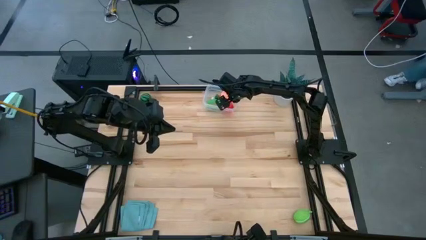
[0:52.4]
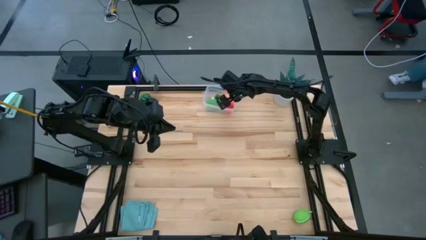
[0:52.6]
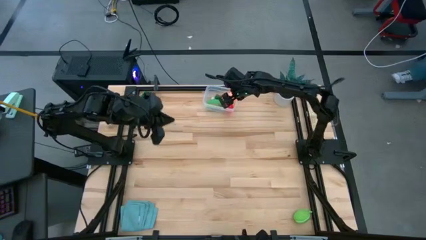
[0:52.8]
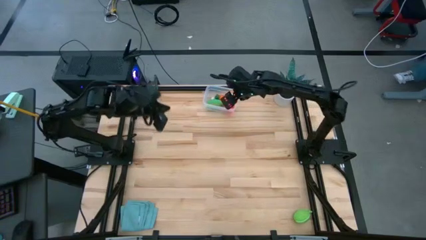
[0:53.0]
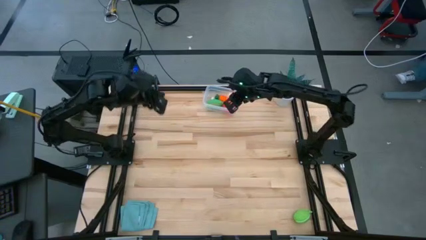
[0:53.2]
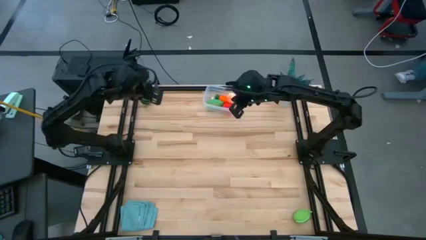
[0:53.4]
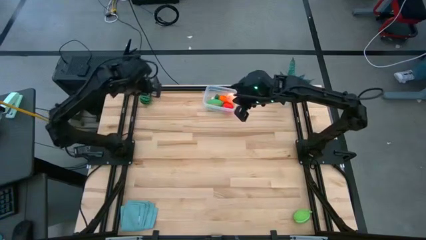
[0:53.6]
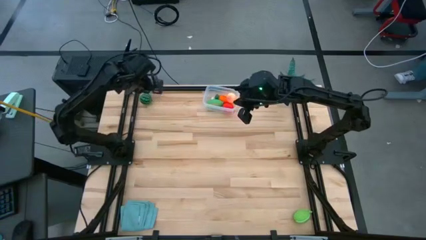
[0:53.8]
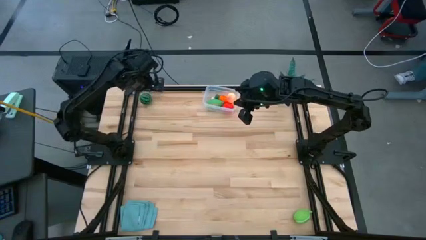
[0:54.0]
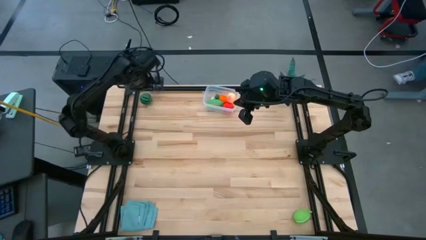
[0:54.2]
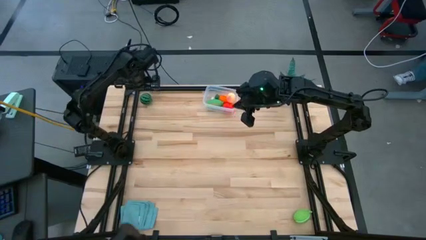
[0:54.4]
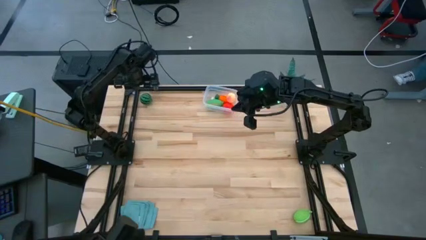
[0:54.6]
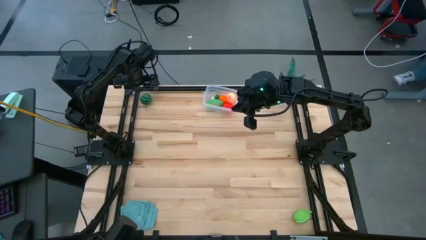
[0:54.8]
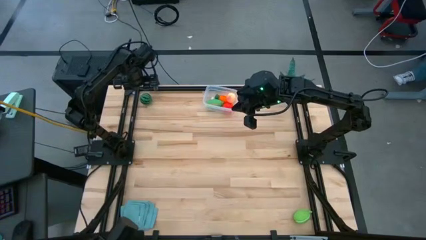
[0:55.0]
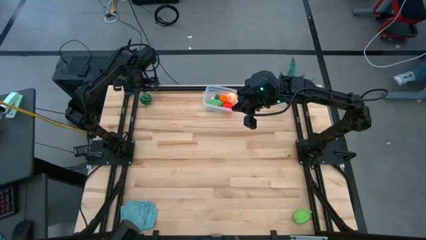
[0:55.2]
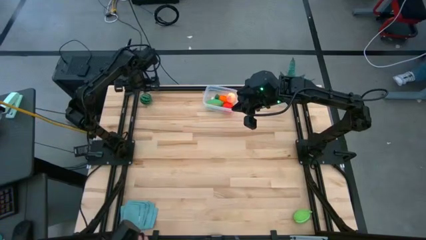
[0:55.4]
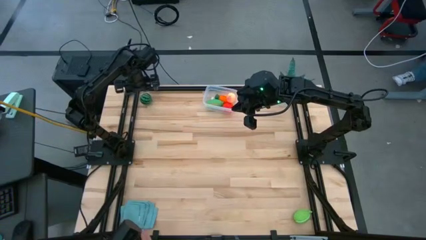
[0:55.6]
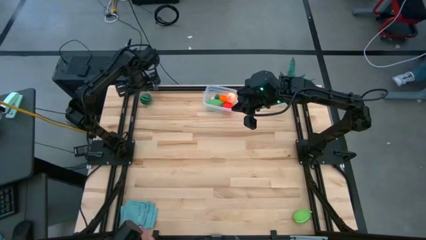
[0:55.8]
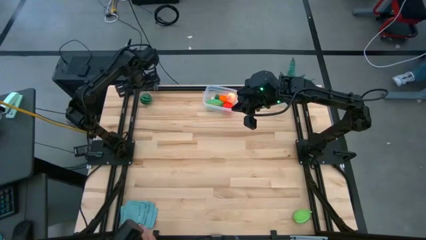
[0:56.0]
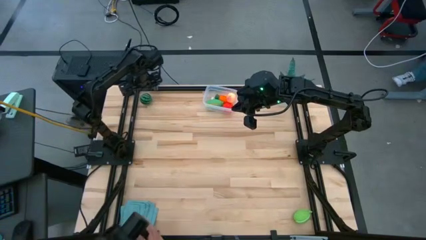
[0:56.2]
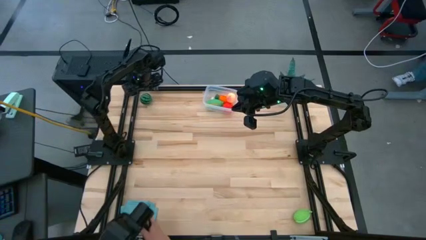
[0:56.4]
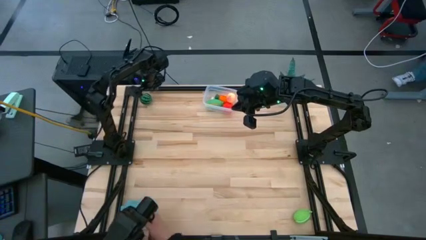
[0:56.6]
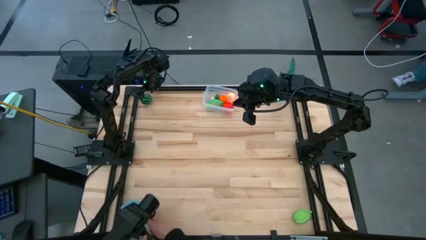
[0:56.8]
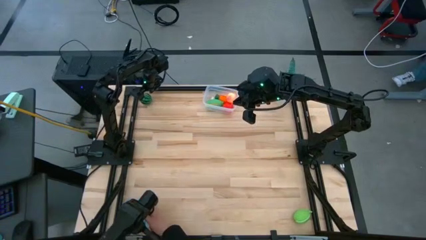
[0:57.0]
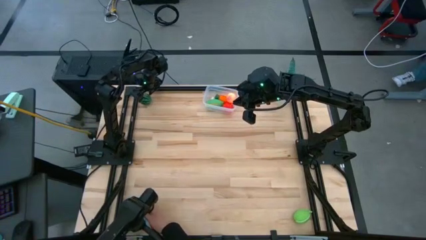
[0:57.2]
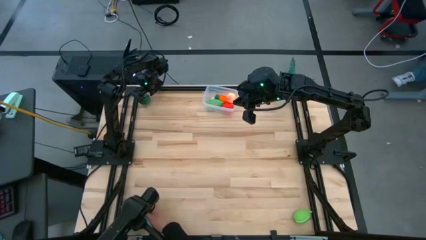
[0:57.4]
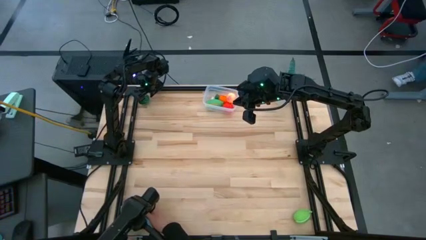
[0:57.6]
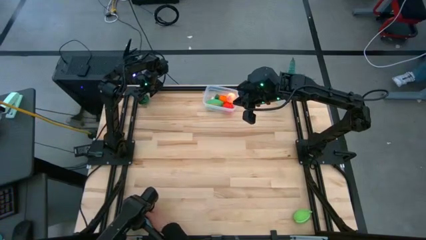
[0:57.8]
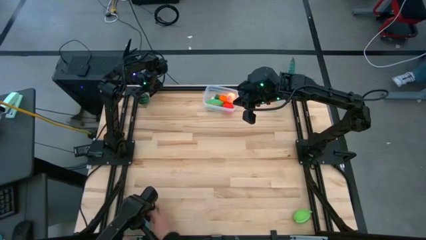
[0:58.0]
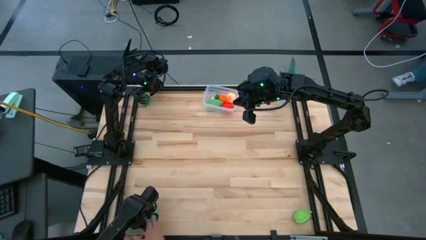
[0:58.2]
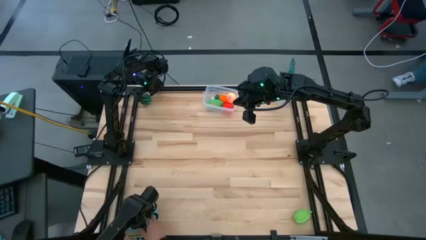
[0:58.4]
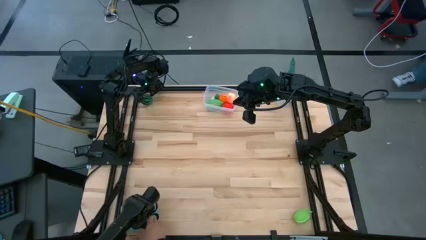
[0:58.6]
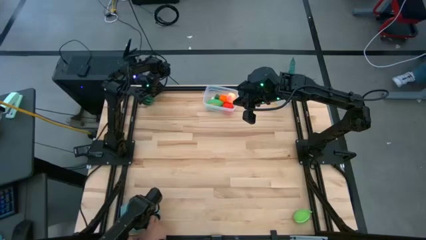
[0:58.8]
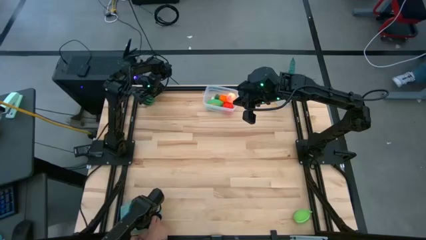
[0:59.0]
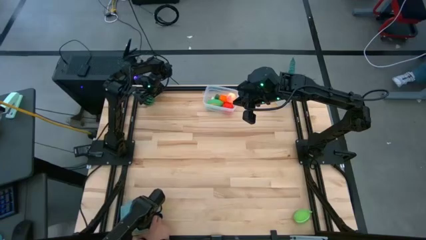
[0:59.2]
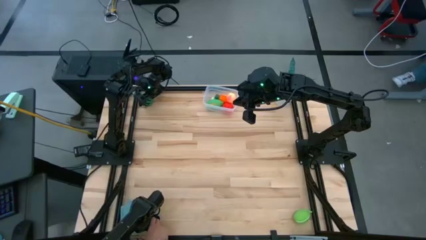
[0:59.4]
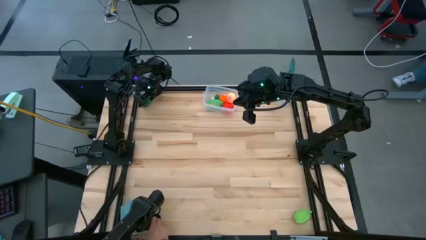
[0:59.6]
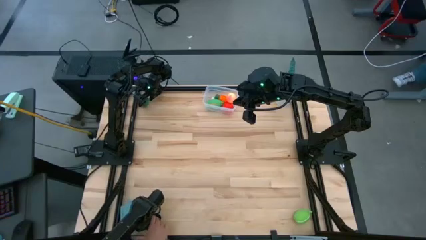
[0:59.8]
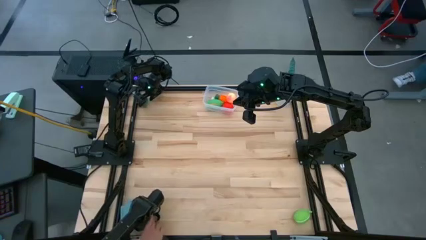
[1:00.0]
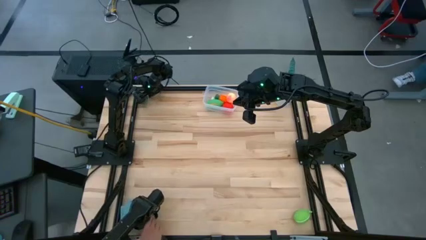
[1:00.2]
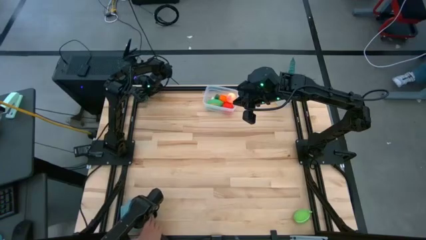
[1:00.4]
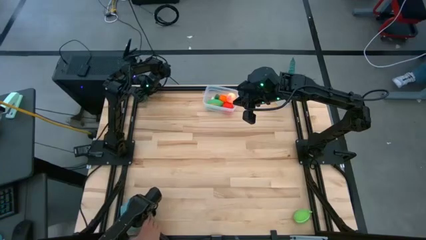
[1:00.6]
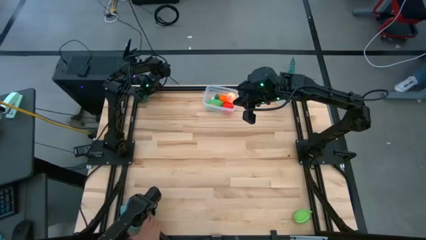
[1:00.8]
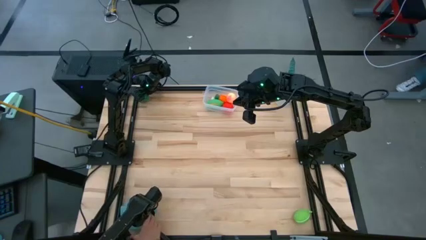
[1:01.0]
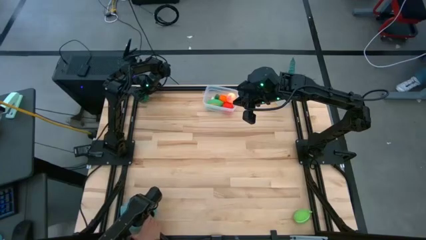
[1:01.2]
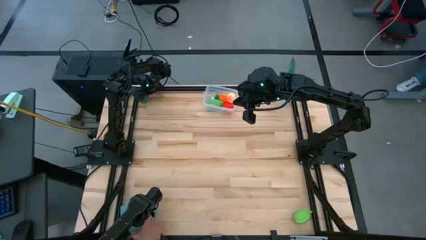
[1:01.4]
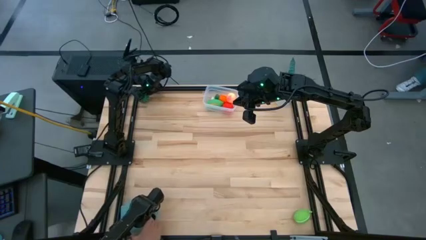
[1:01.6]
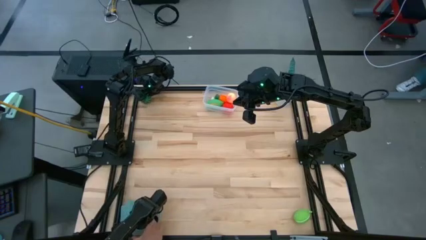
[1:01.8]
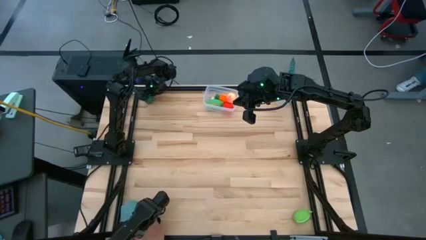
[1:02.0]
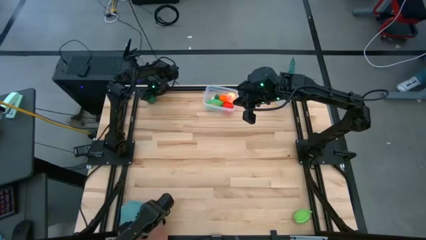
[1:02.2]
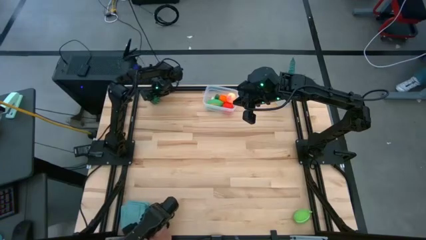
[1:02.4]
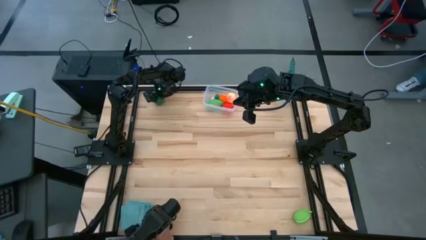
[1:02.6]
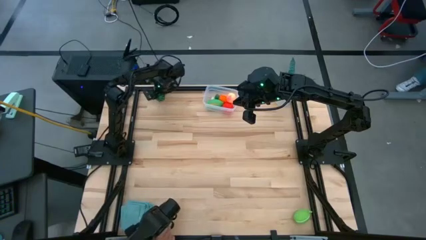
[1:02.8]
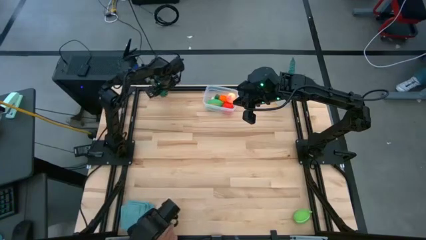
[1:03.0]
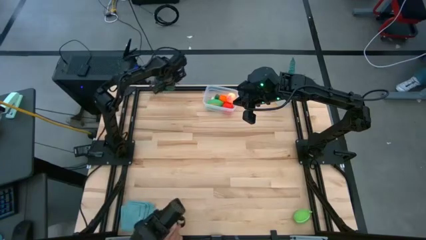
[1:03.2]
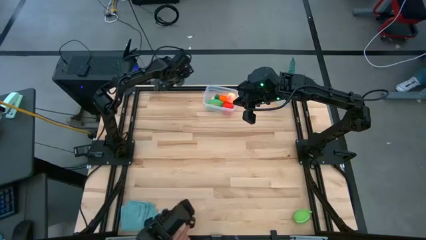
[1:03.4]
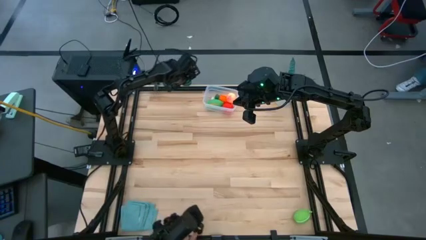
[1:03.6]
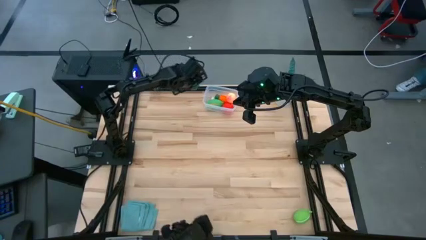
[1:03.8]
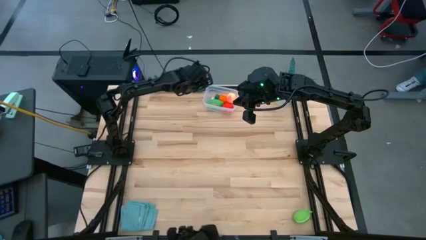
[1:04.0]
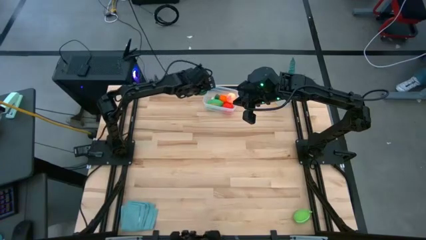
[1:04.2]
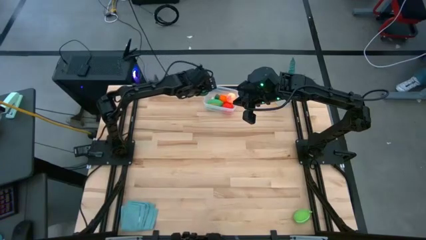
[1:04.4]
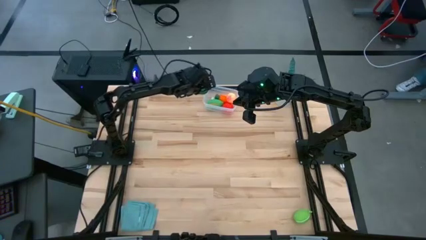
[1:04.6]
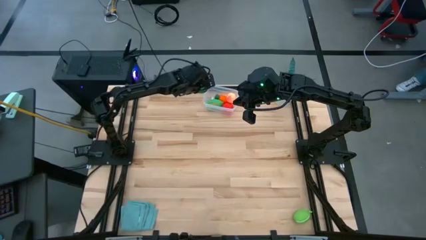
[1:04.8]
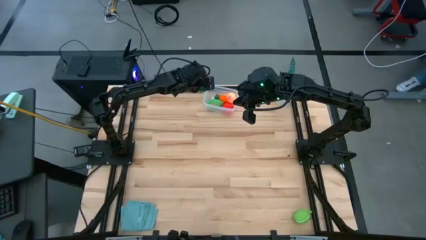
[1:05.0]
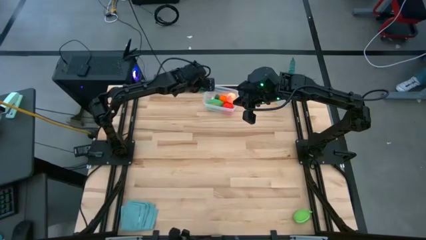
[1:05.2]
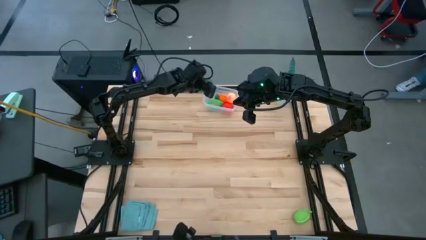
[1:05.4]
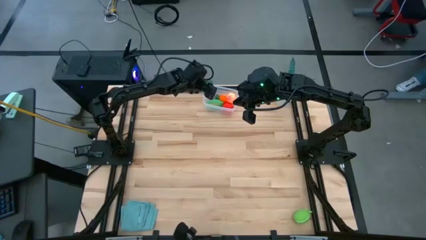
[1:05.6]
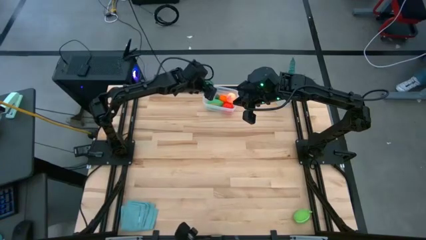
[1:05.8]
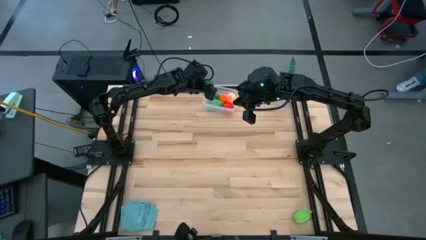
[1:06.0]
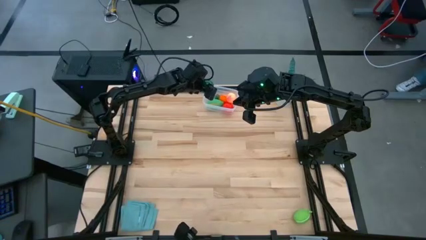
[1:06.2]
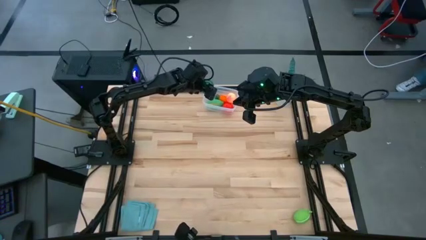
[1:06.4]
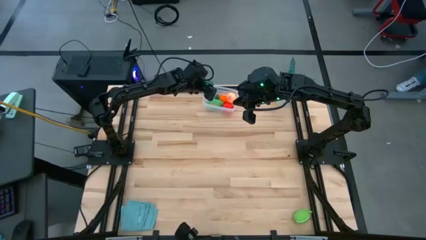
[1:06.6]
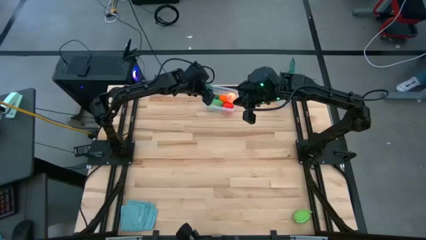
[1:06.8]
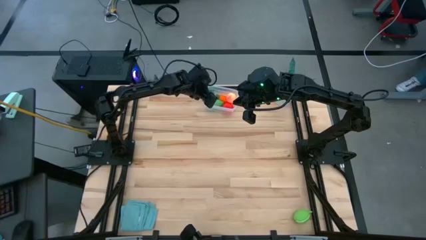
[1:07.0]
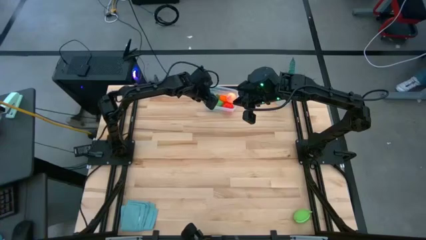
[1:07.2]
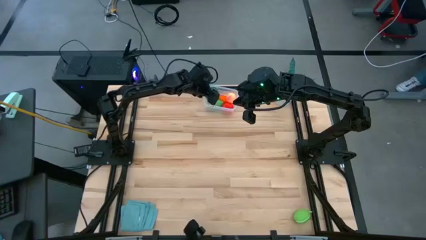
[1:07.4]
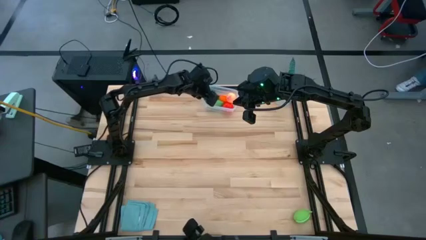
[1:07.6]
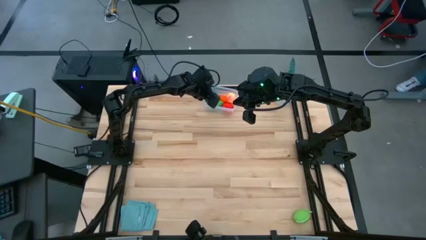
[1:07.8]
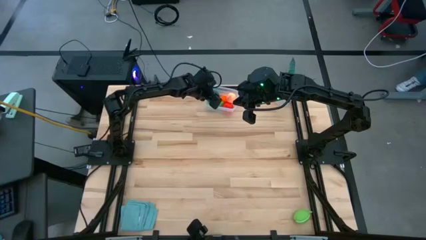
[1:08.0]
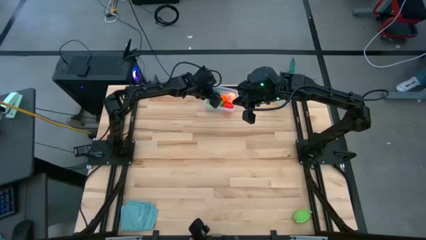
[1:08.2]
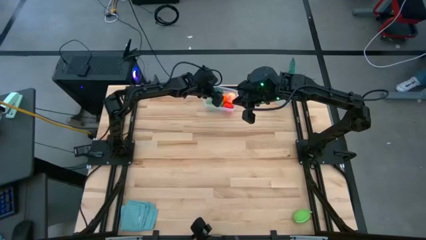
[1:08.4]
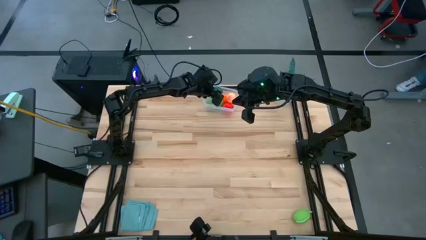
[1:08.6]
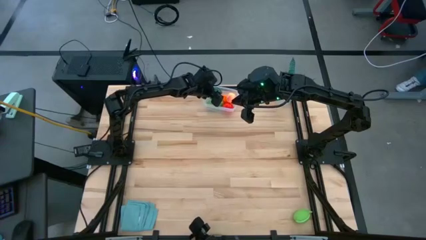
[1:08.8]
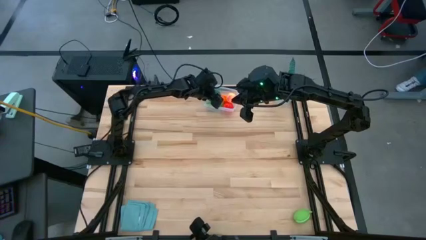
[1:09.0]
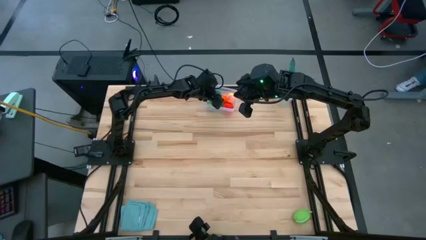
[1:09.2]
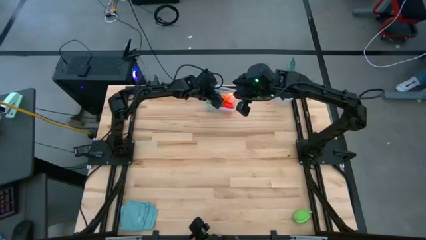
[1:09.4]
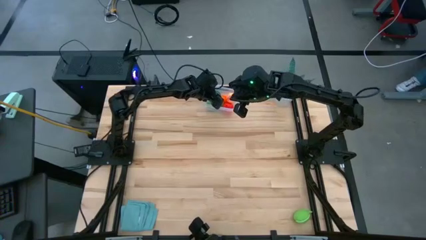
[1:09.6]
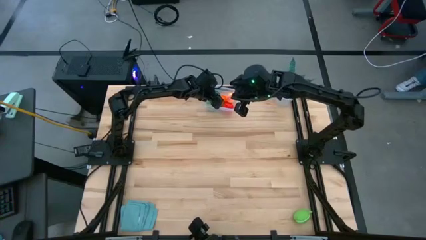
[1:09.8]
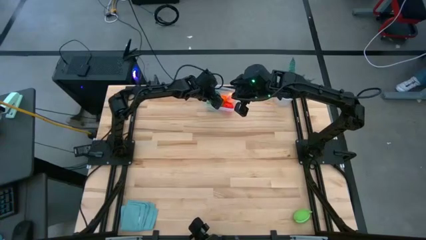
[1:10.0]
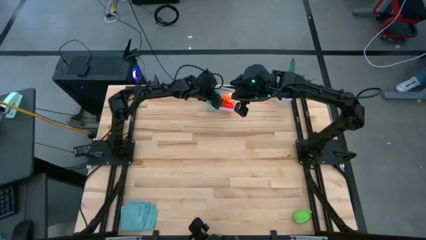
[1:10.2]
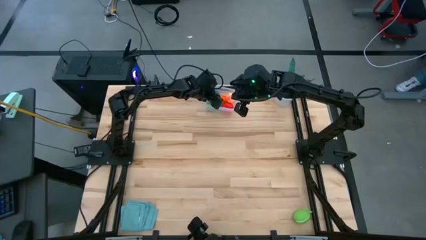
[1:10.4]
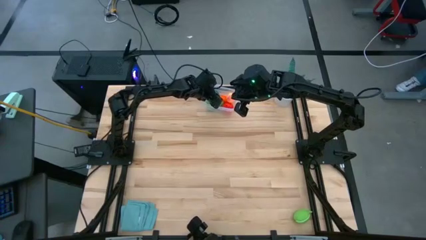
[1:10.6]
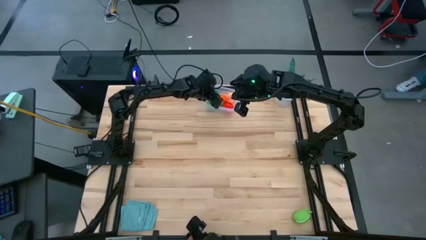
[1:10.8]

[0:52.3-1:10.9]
Task: Pick and placing Produce into tupperware
Put the green watermelon into the transparent container
